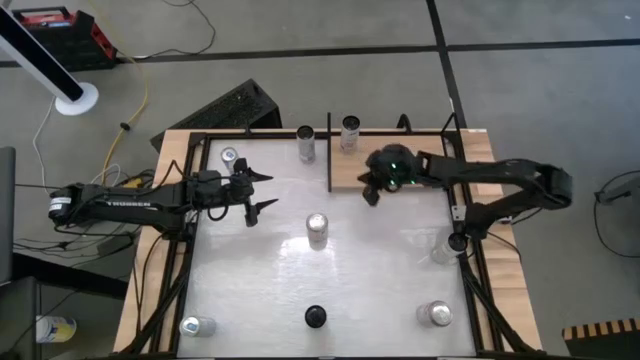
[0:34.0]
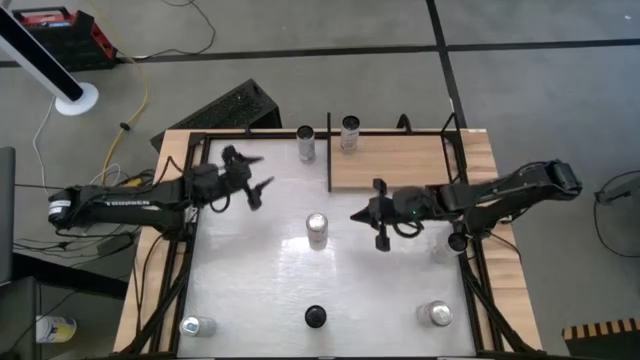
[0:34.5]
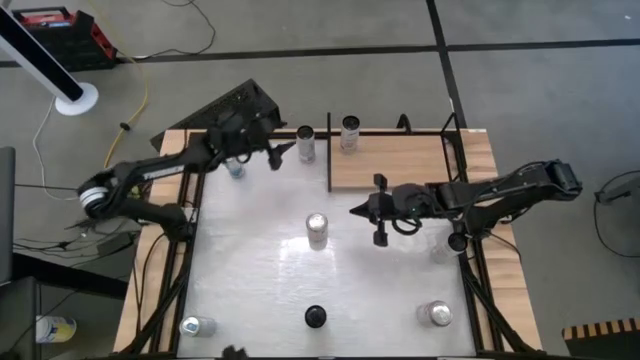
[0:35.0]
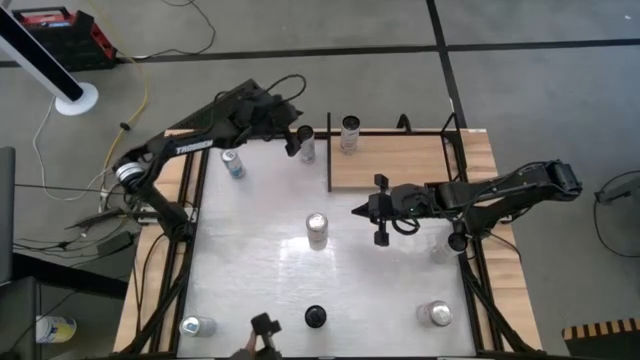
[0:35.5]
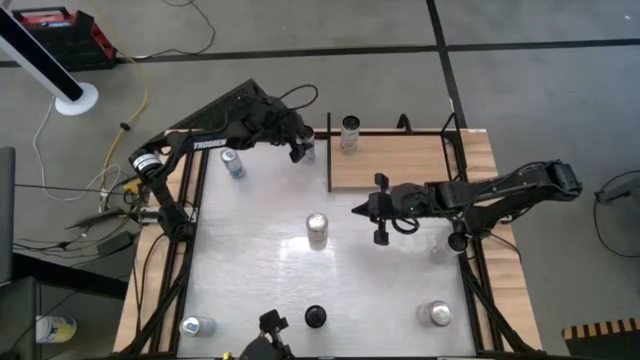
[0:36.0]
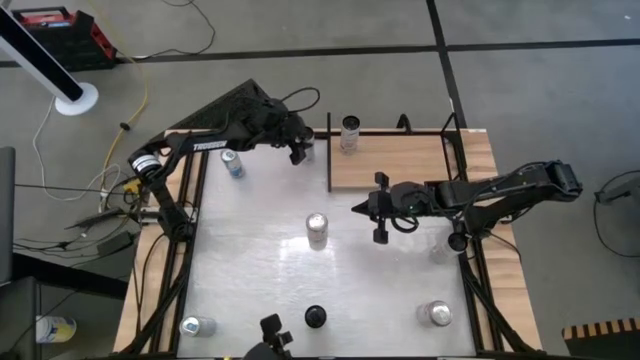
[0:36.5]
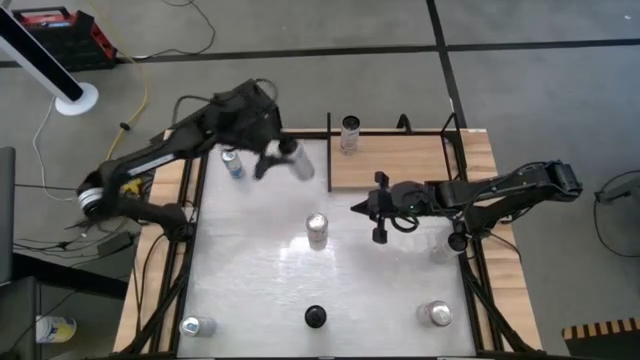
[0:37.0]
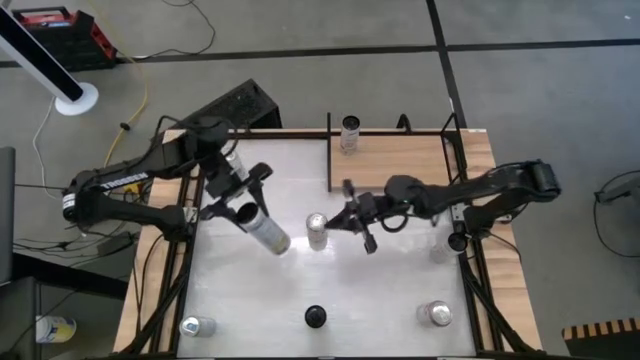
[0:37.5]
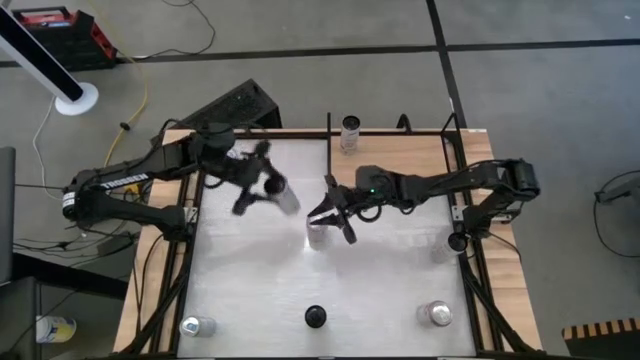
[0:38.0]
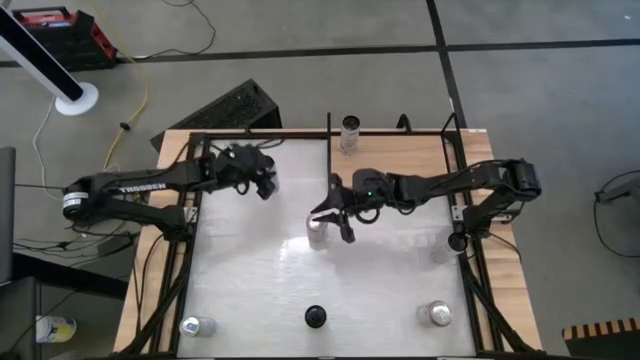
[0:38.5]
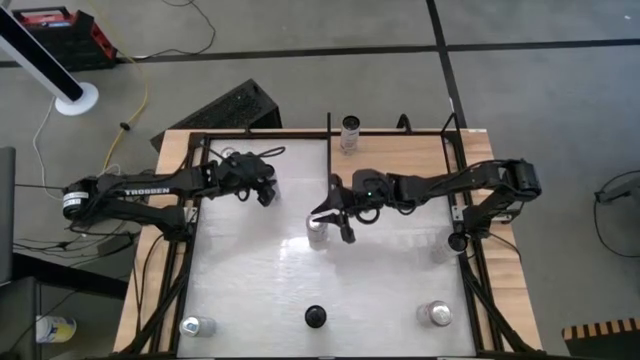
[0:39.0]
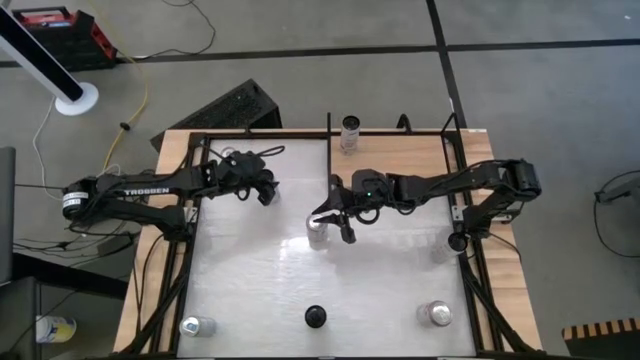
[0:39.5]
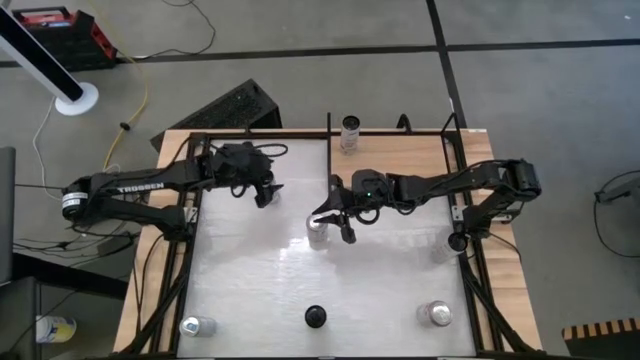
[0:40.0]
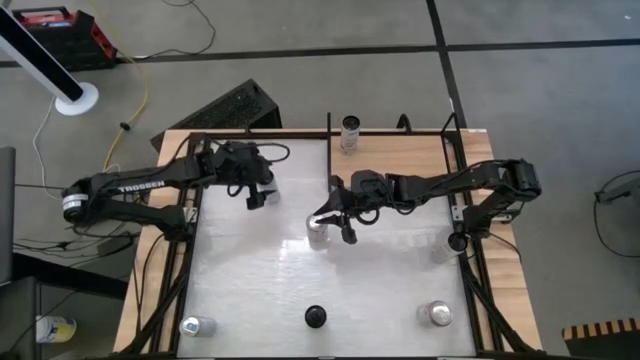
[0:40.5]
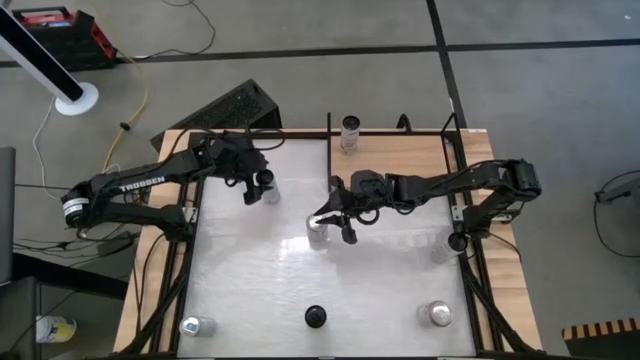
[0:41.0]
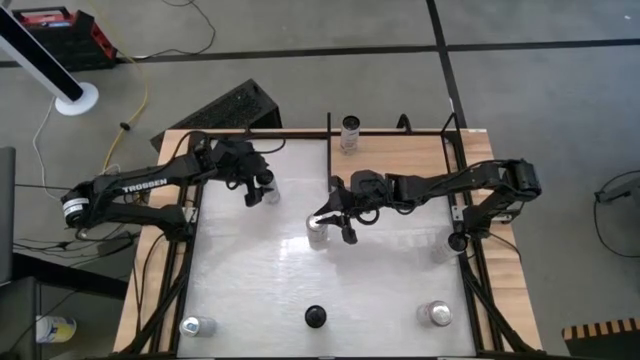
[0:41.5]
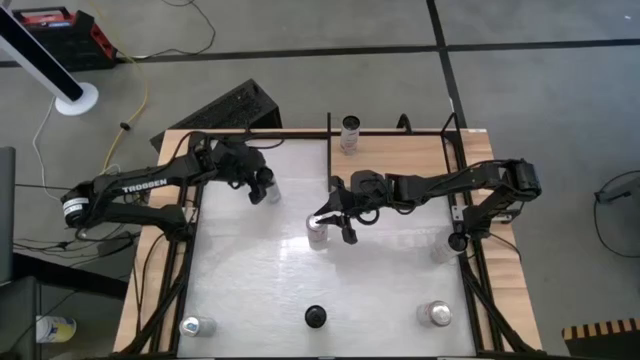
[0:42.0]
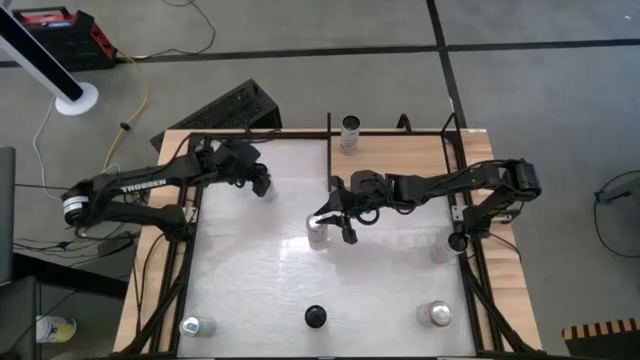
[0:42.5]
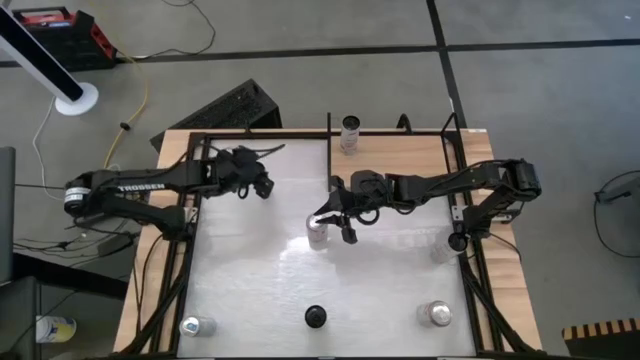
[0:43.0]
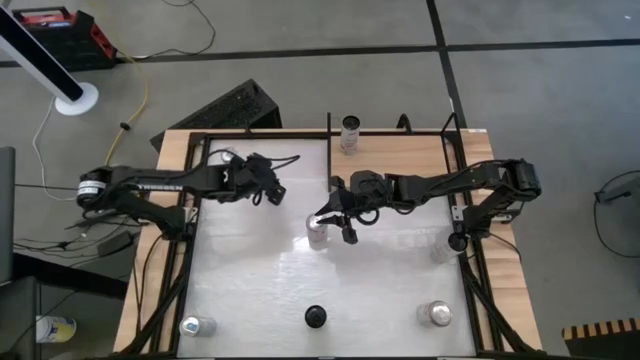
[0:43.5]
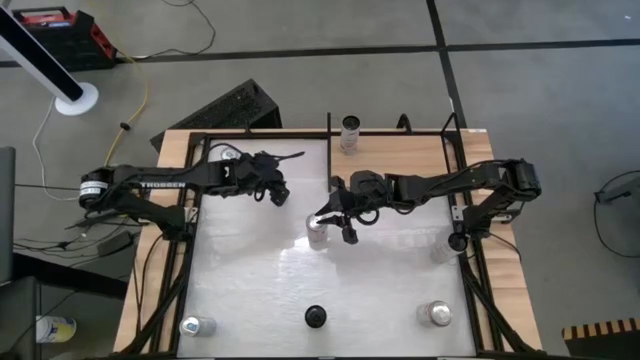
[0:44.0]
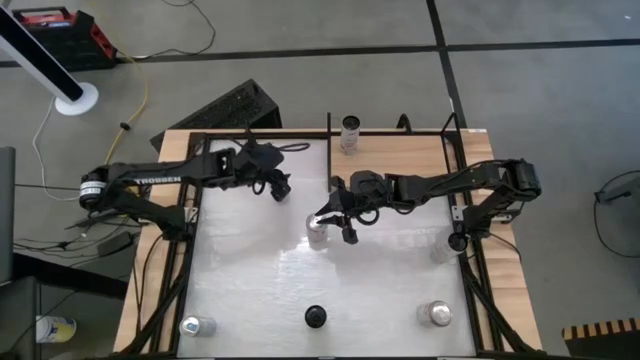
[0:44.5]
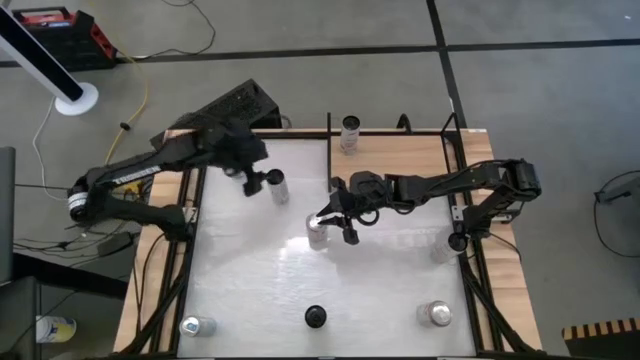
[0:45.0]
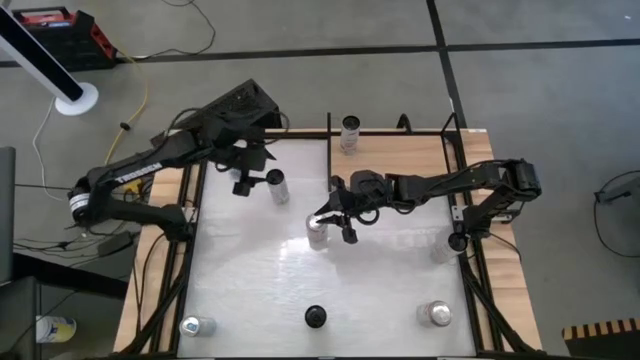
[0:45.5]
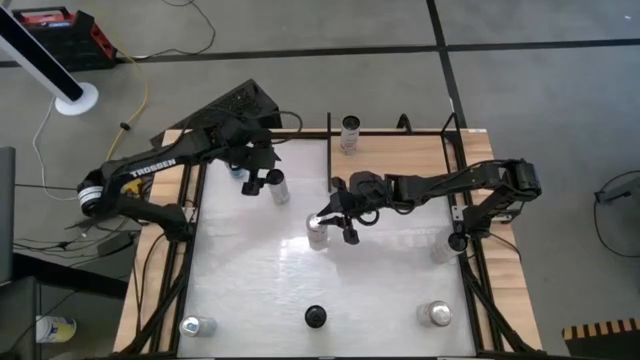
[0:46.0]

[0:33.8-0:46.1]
Task: Place canned beverage on shelf
Put the top white and yellow soda can on the shelf

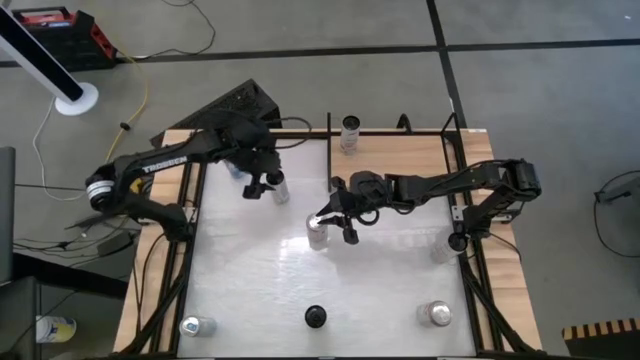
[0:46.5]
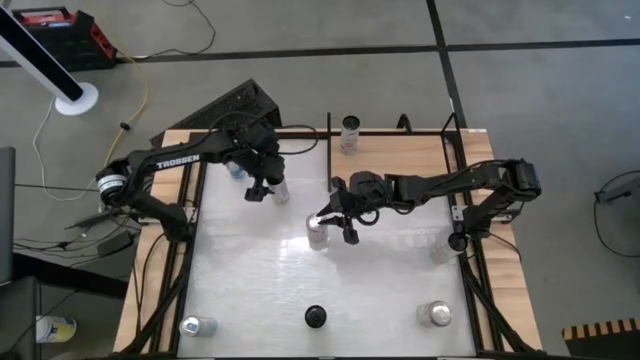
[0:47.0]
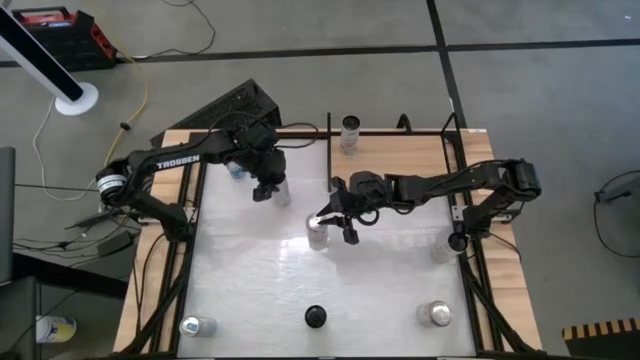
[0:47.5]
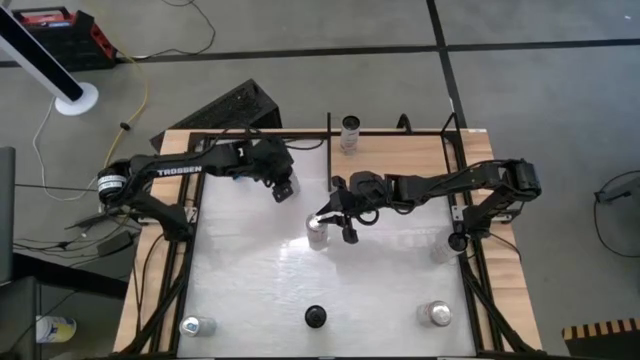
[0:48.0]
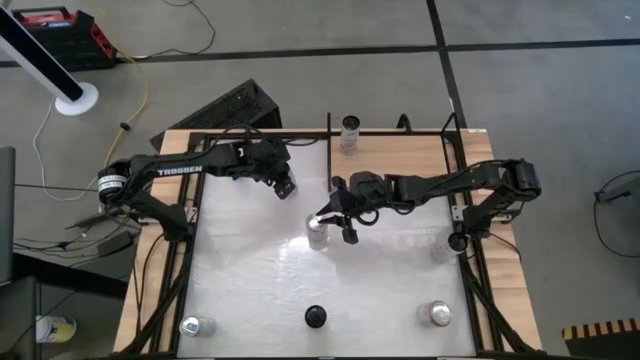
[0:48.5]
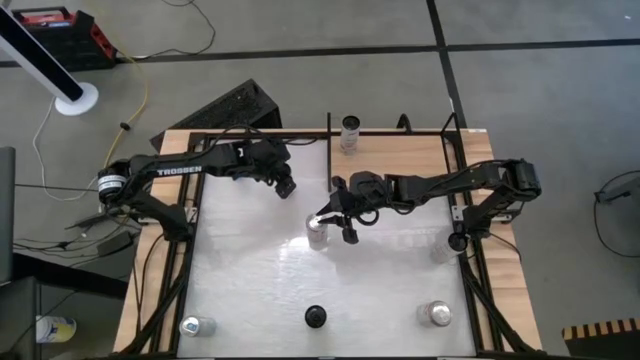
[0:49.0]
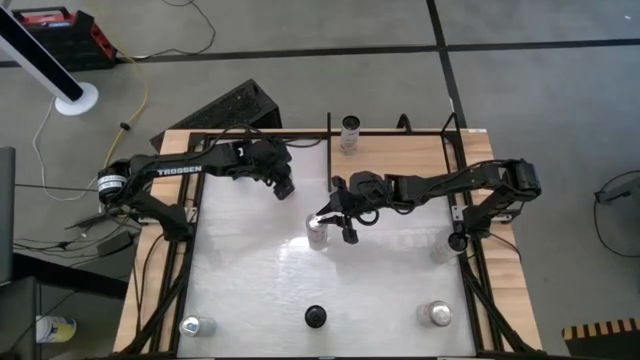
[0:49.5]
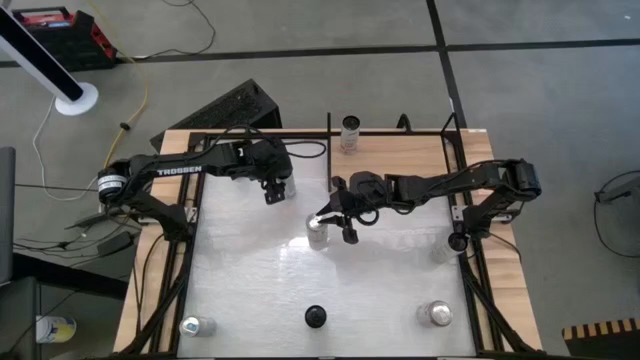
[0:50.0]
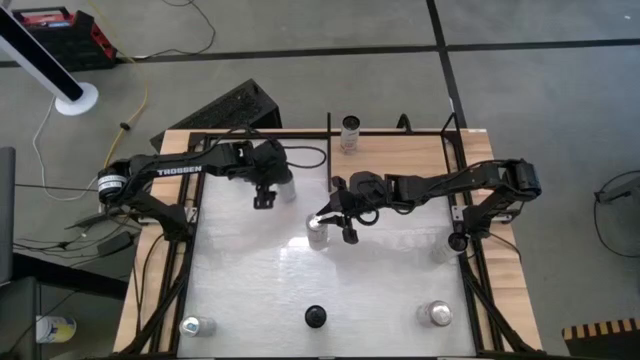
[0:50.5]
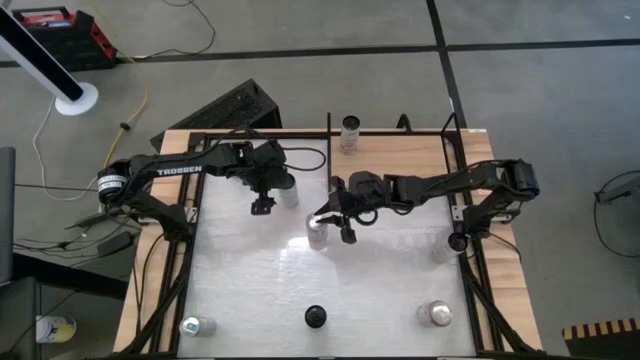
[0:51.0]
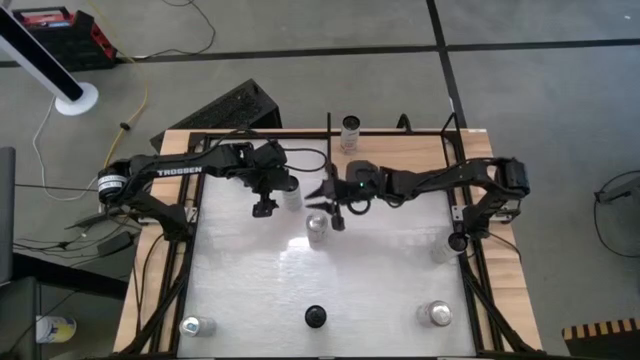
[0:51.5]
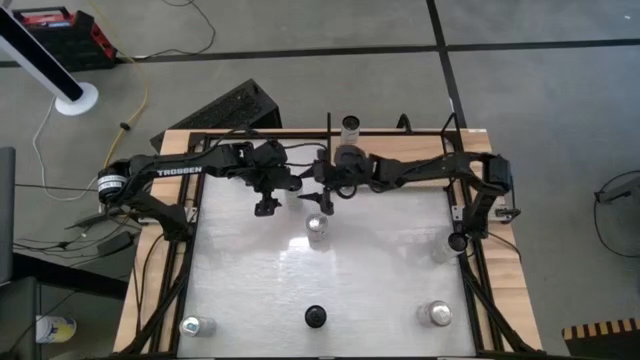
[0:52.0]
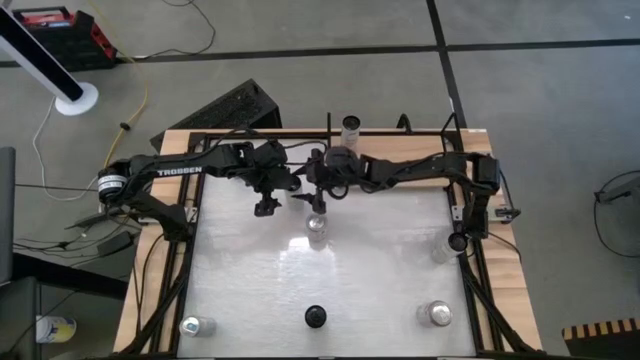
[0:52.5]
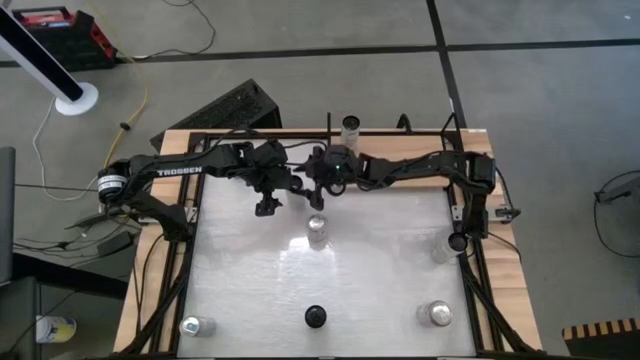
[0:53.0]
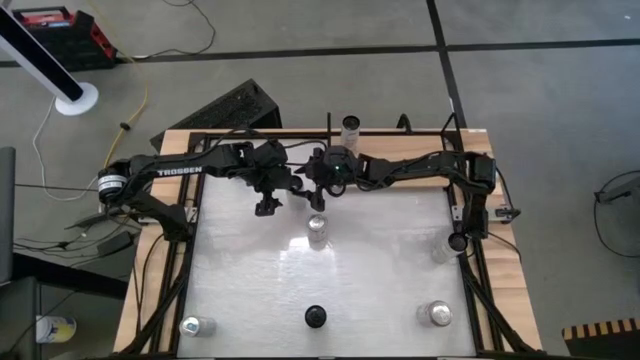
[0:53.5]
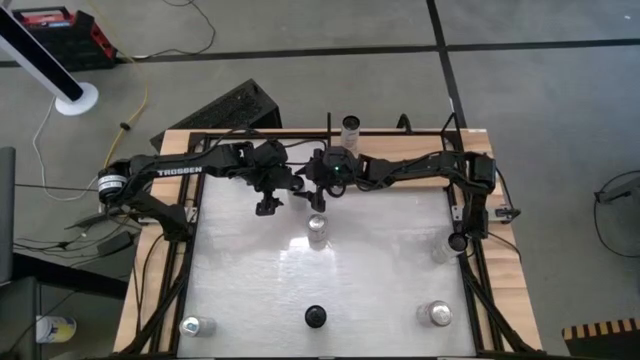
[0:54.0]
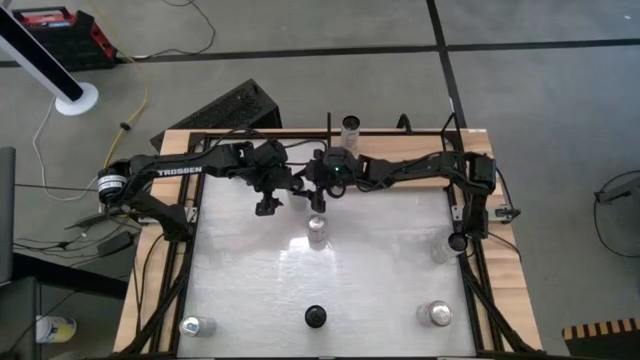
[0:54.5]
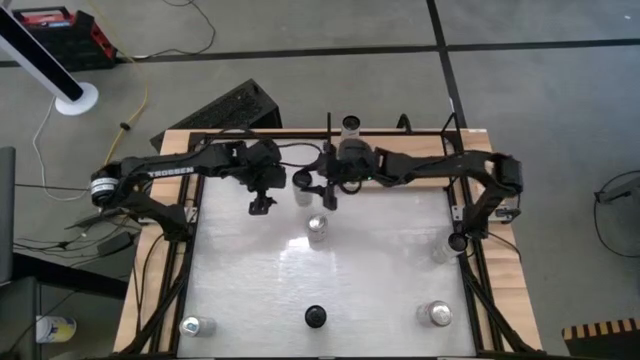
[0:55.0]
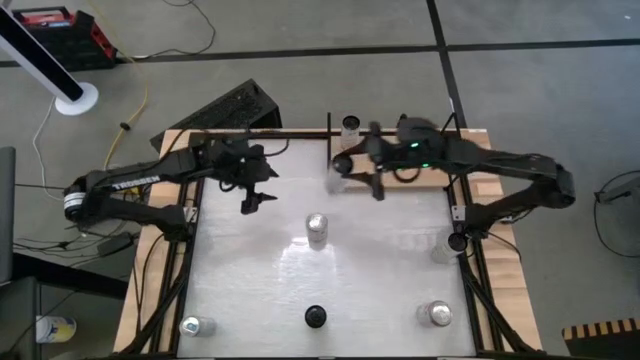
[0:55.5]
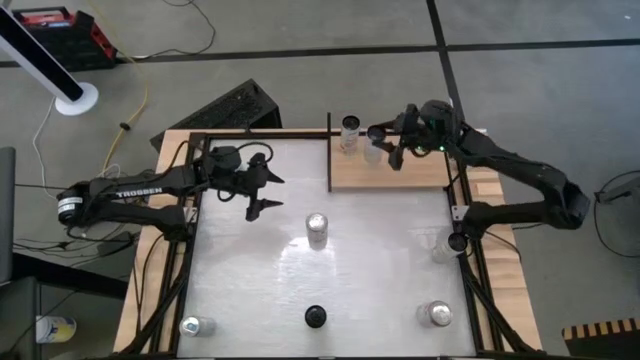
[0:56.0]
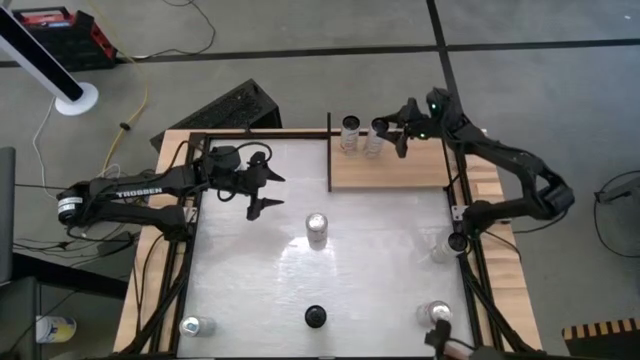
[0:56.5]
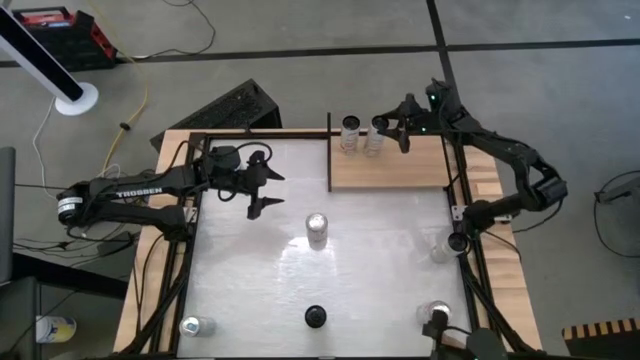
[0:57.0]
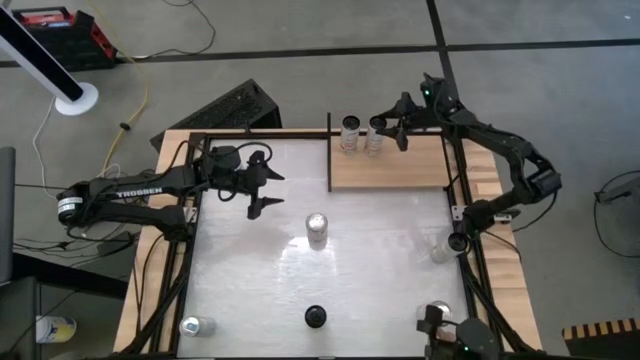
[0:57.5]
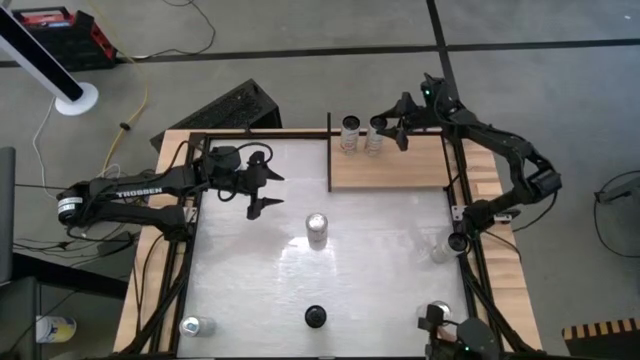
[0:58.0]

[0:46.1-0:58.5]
Put the top white and yellow soda can on the shelf
